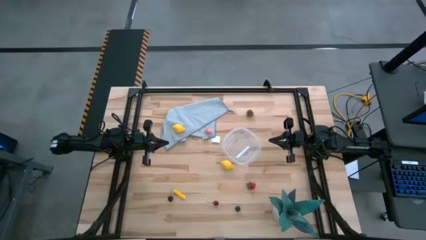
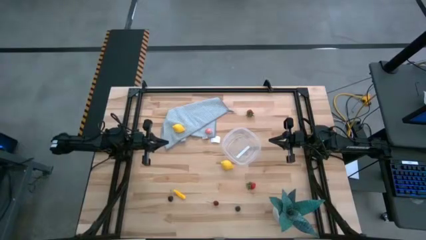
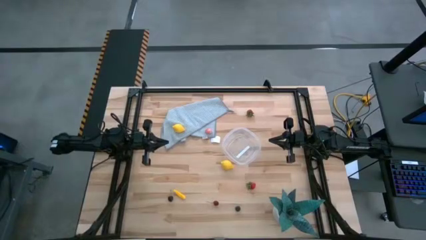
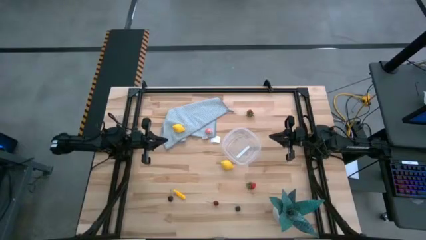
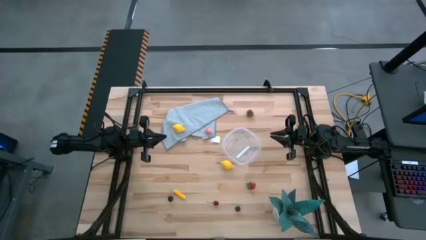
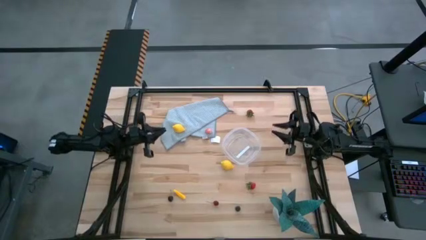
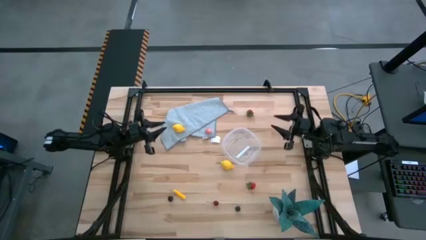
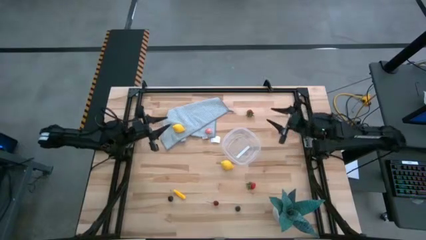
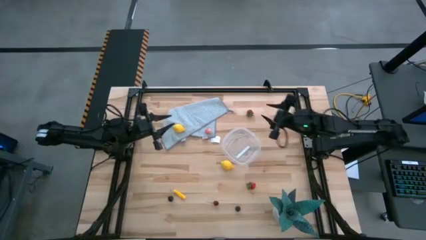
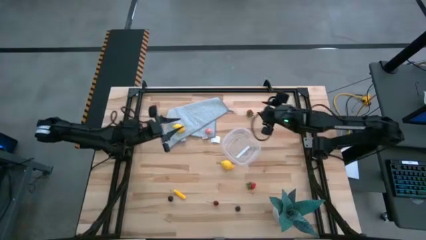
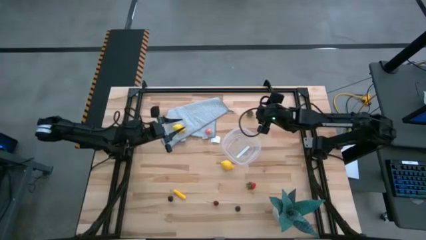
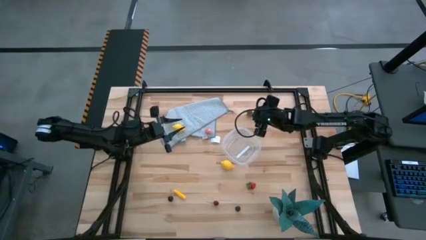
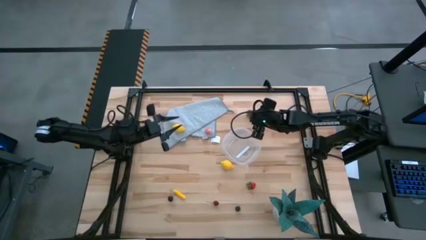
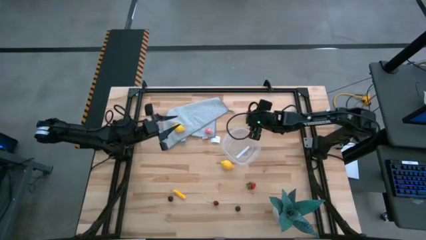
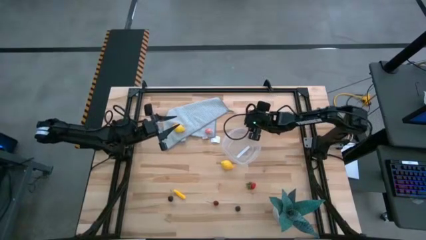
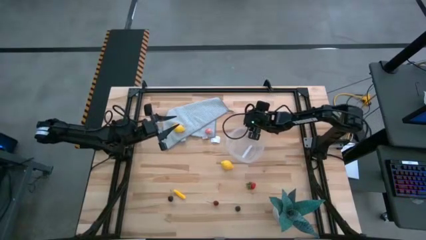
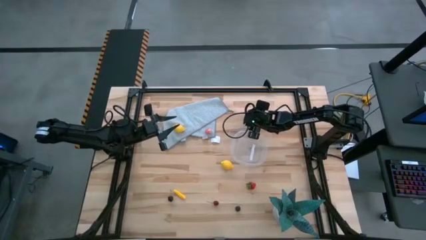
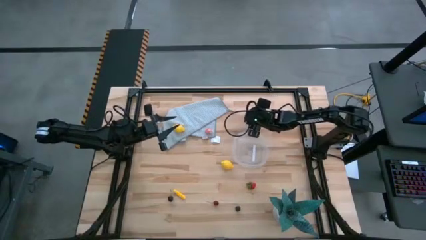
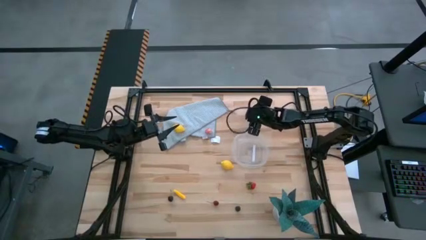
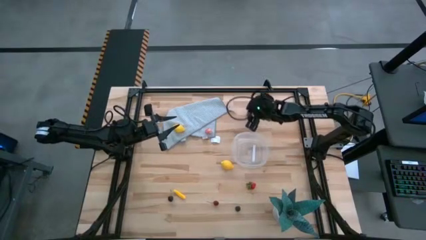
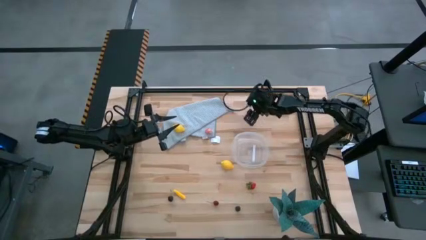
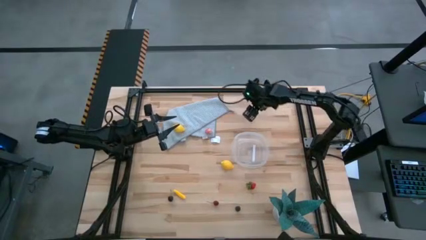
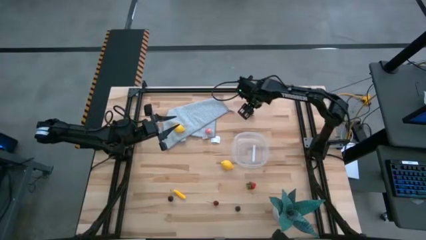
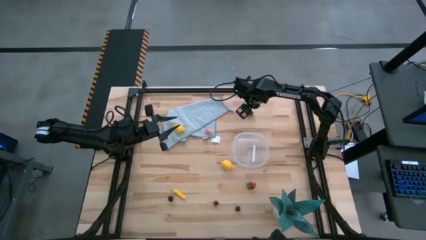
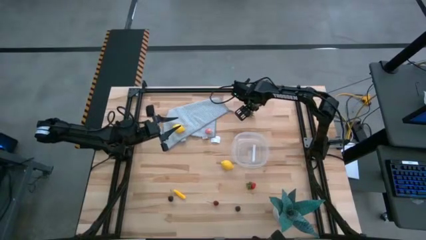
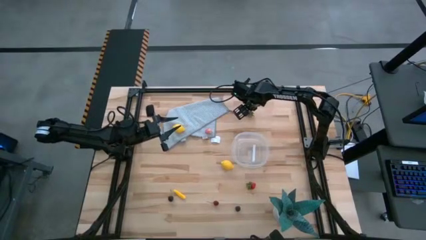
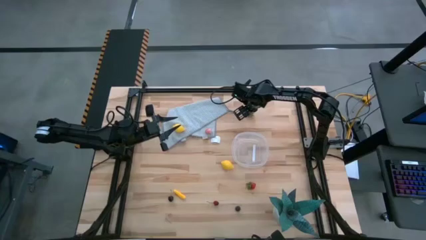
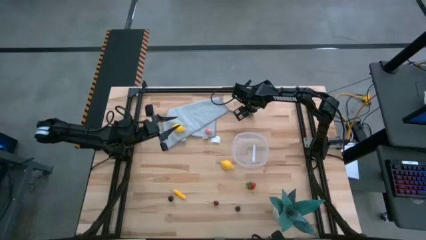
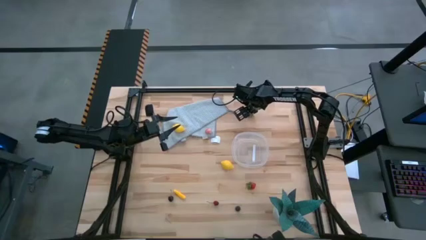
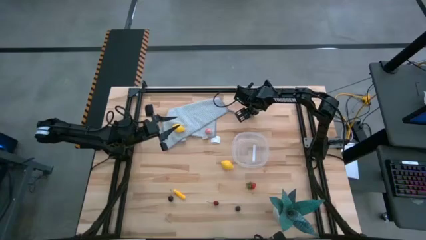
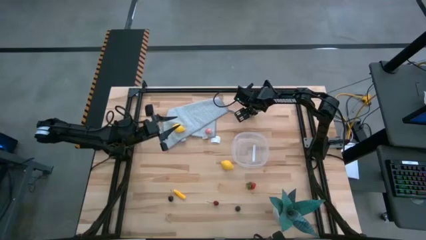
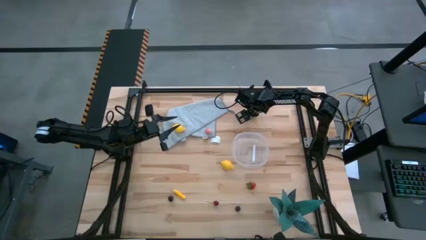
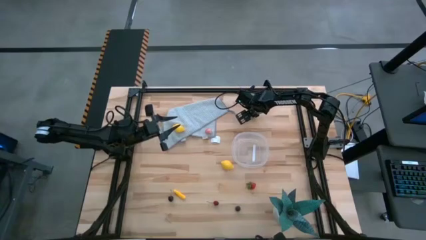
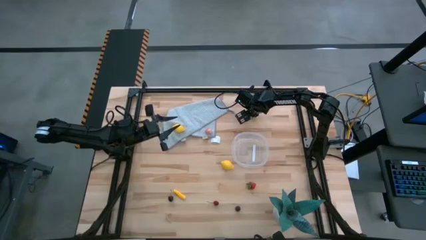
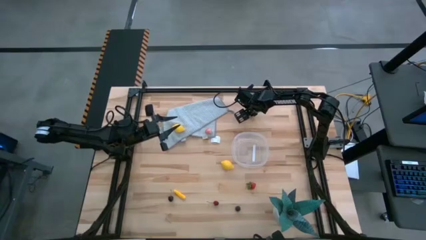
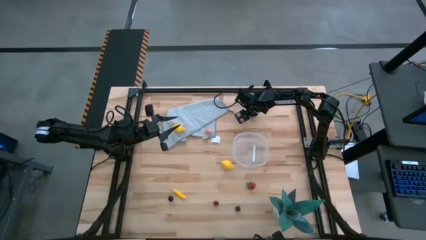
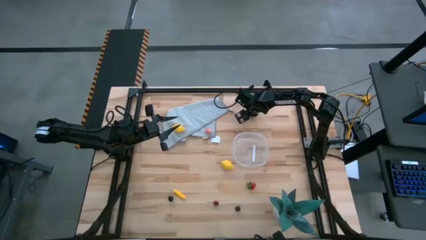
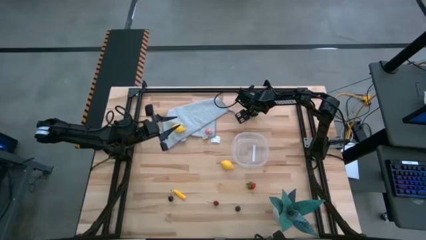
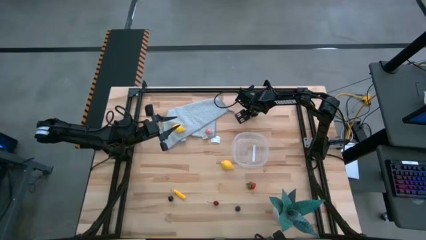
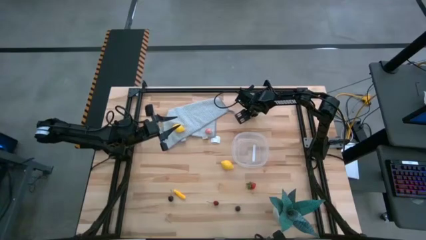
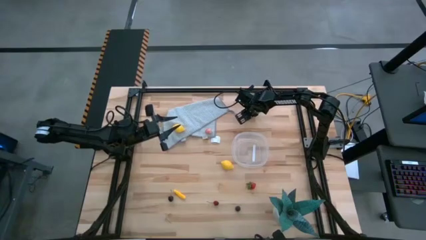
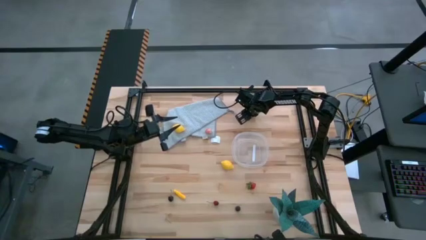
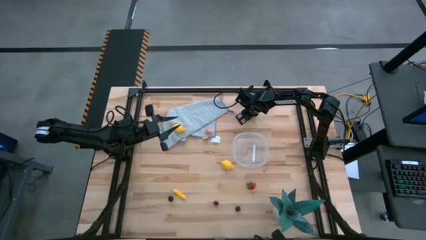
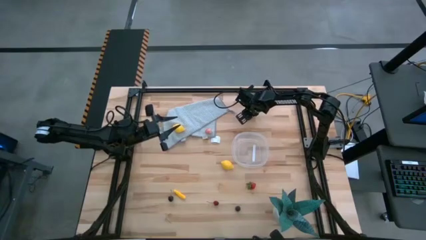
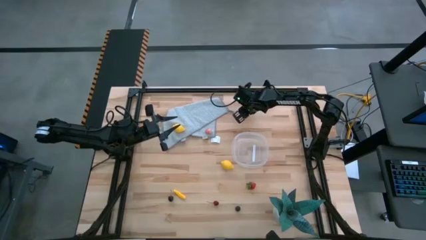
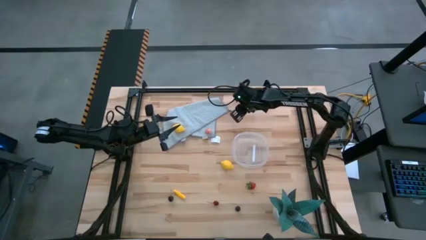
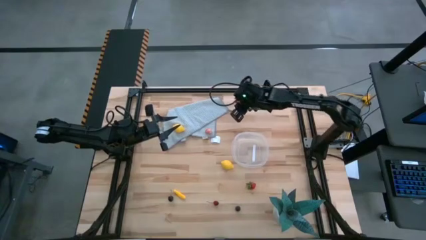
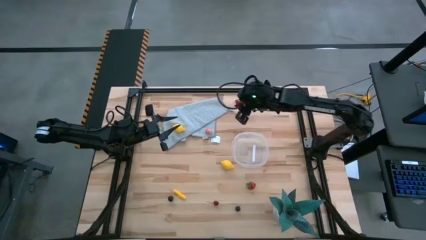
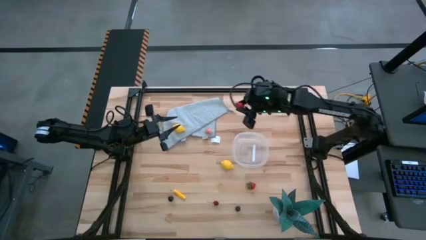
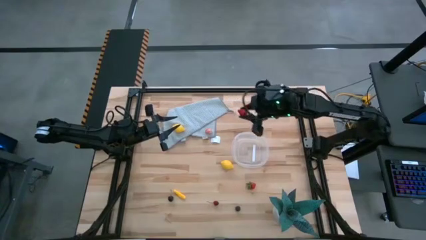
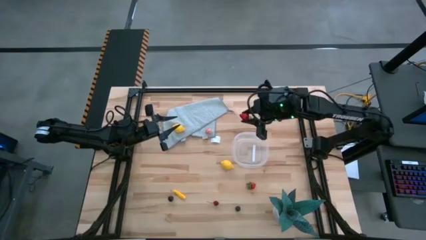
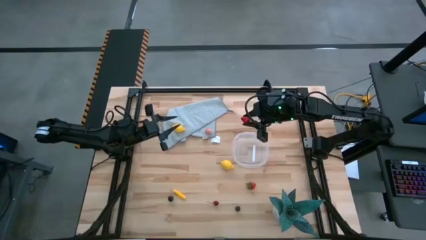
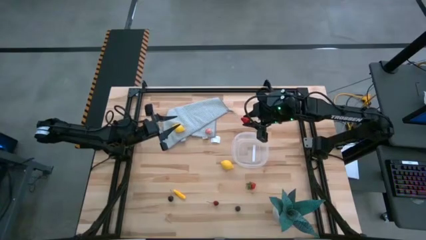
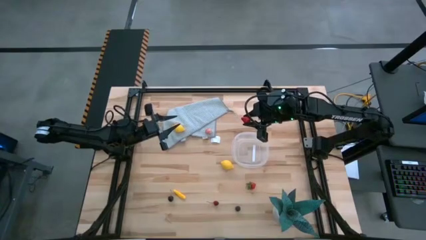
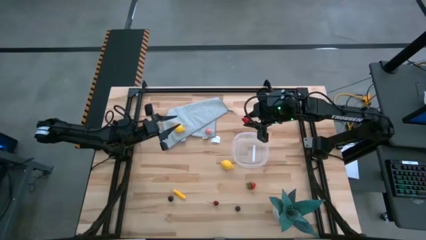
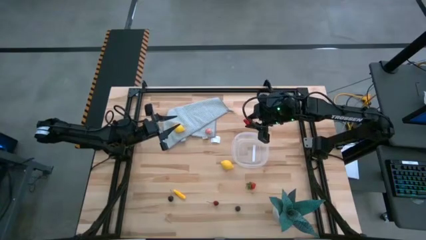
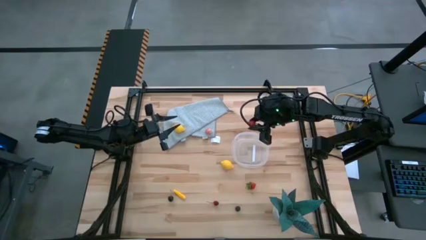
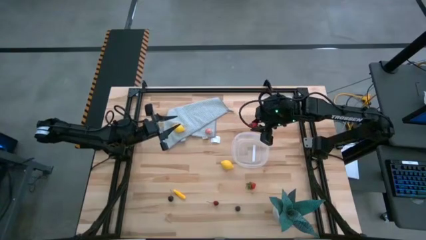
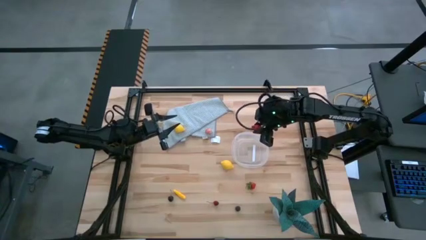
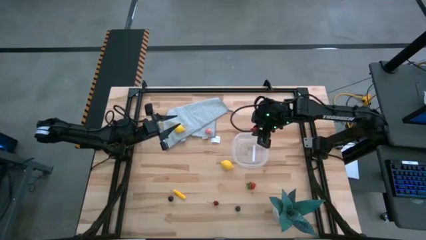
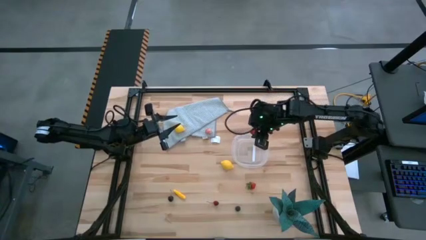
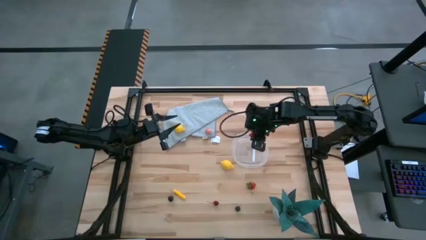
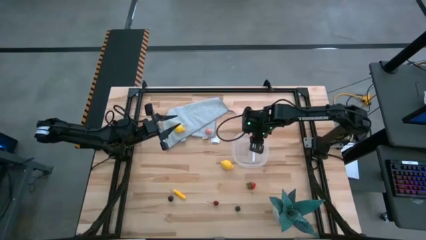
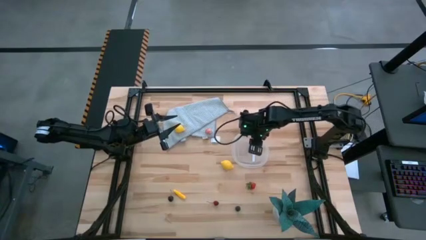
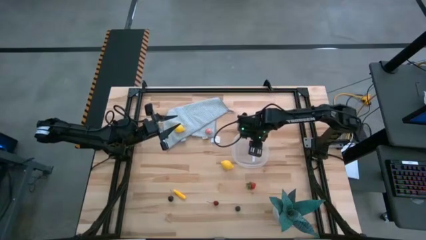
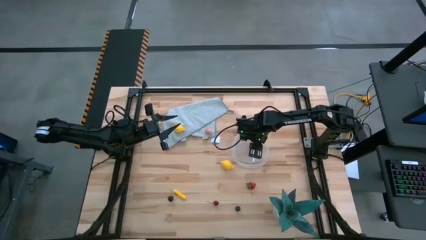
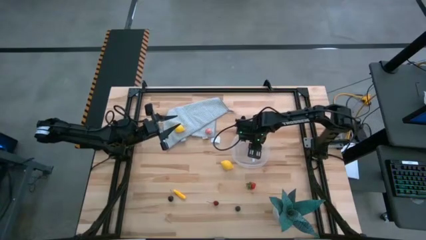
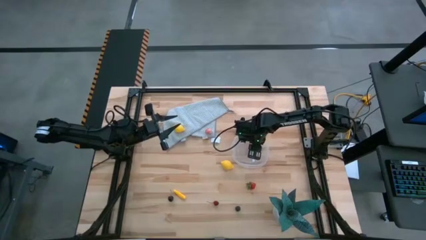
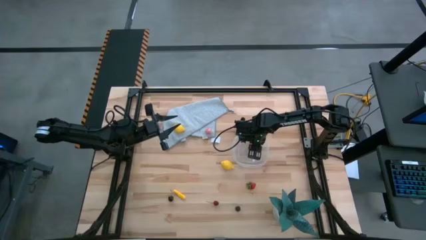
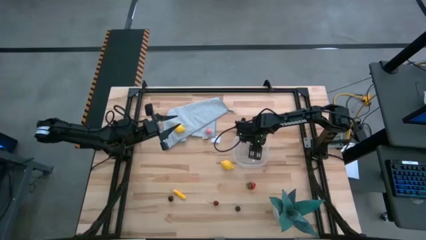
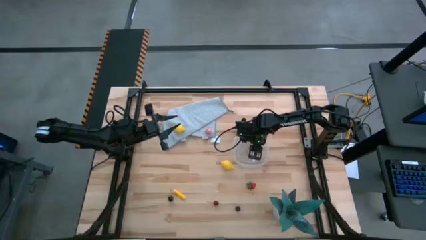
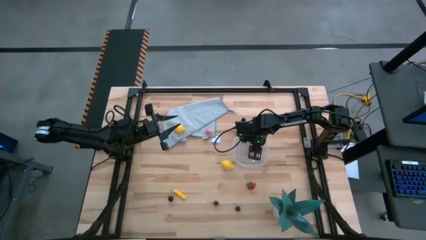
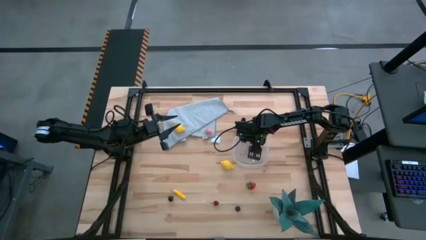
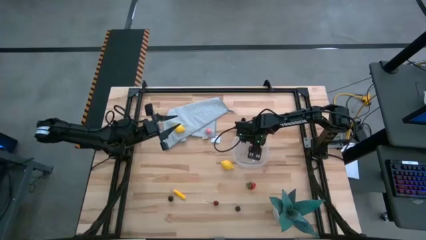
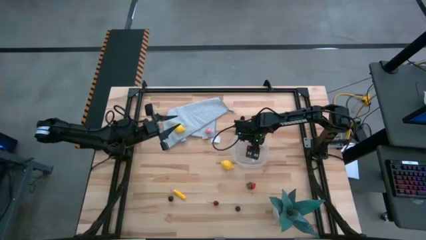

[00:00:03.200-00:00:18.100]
Task: Pick and placing Produce into tupperware
Put the top strawberry into the transparent container
